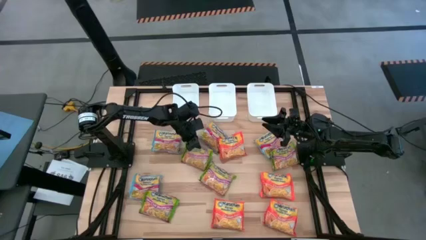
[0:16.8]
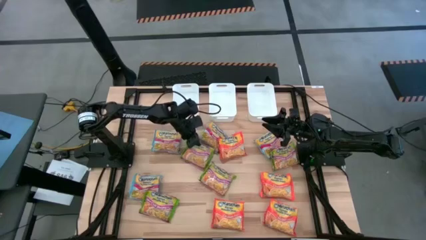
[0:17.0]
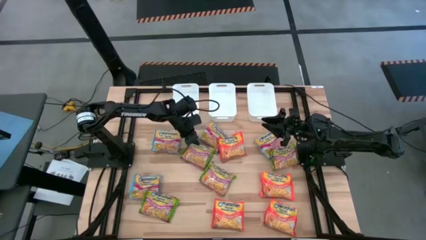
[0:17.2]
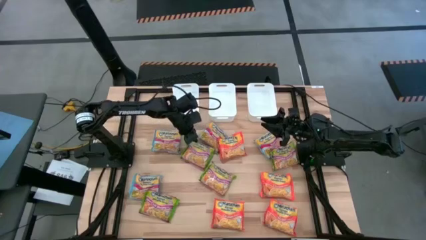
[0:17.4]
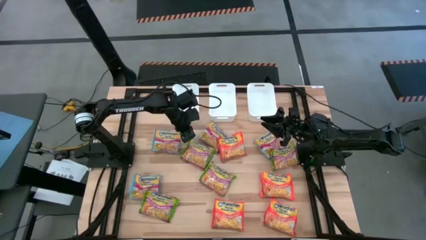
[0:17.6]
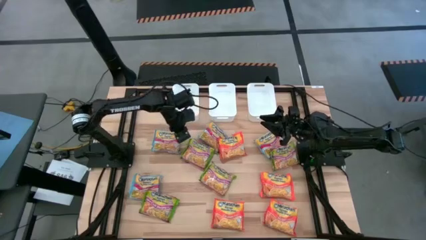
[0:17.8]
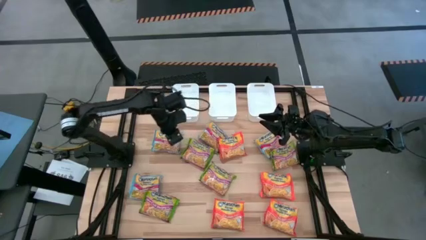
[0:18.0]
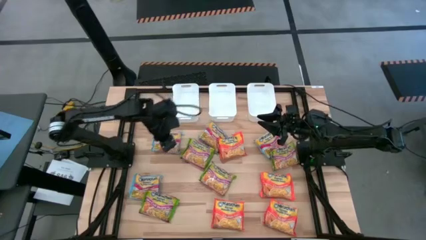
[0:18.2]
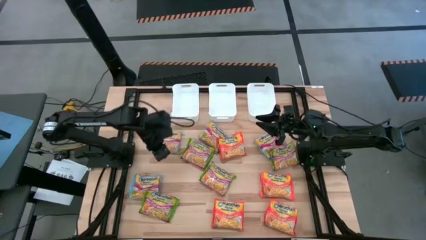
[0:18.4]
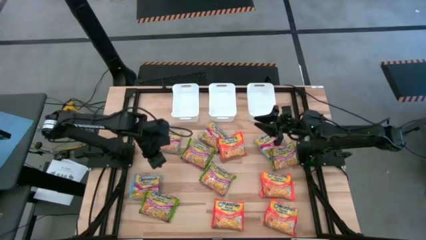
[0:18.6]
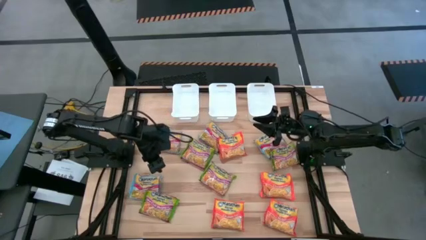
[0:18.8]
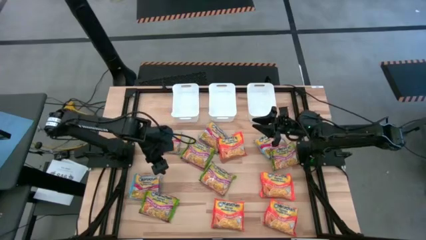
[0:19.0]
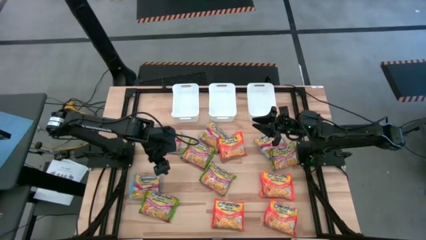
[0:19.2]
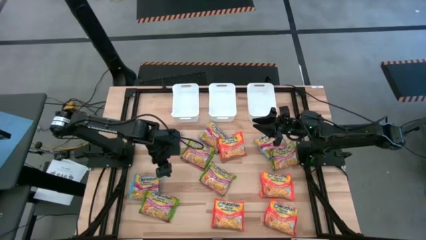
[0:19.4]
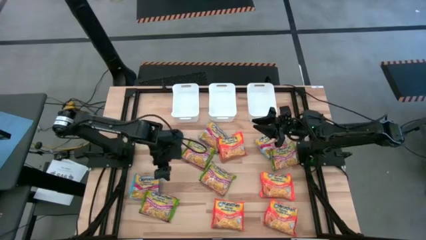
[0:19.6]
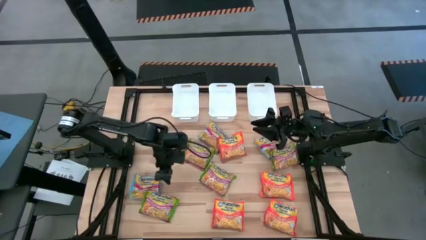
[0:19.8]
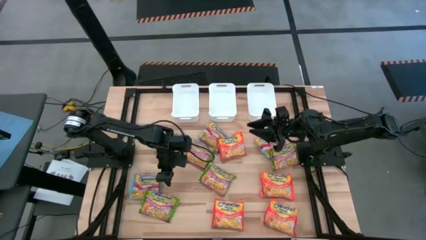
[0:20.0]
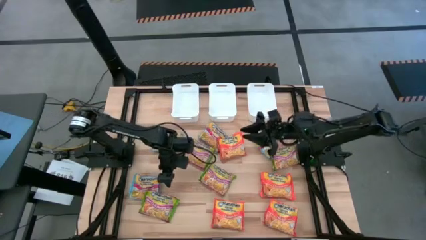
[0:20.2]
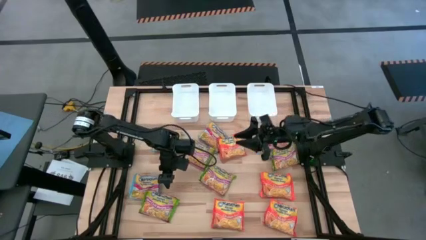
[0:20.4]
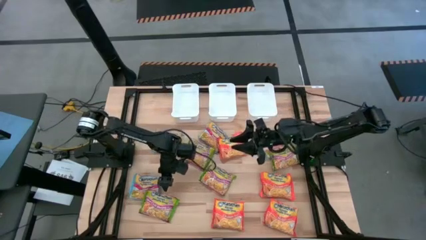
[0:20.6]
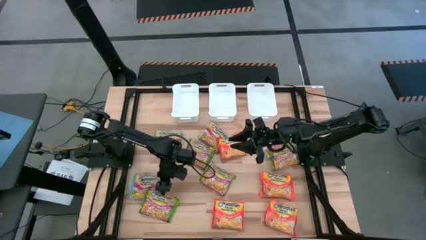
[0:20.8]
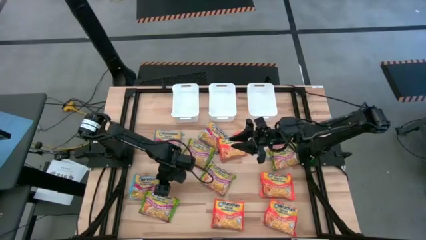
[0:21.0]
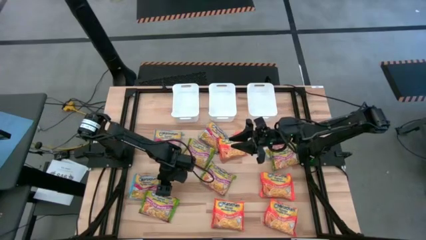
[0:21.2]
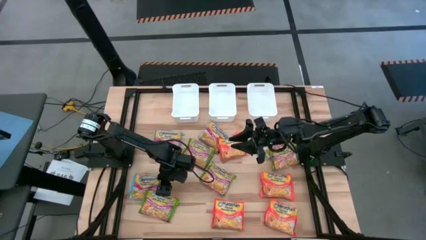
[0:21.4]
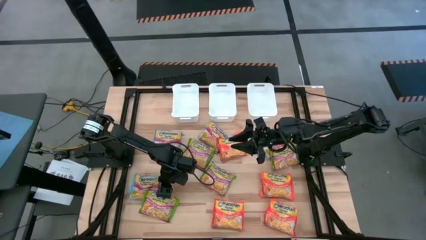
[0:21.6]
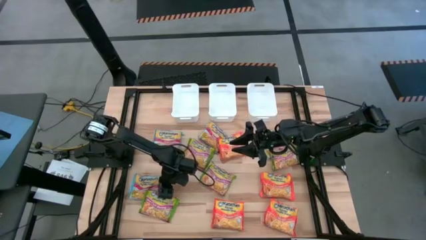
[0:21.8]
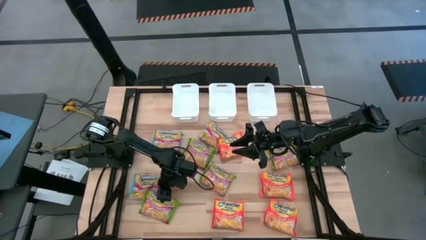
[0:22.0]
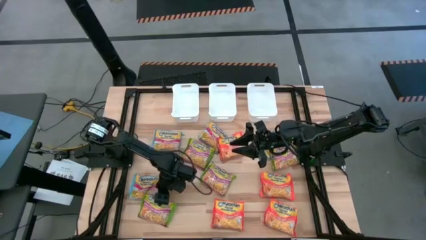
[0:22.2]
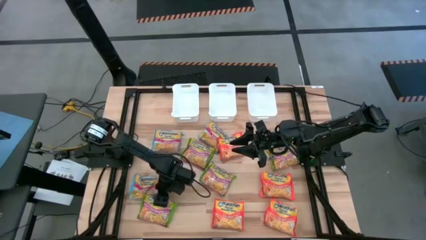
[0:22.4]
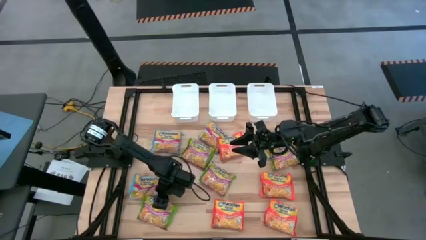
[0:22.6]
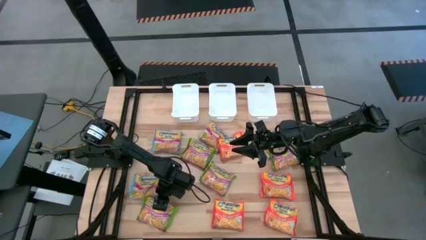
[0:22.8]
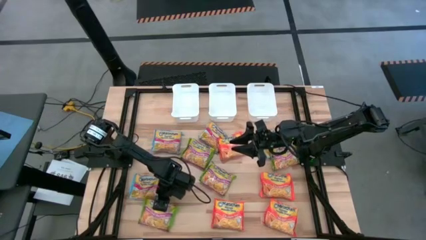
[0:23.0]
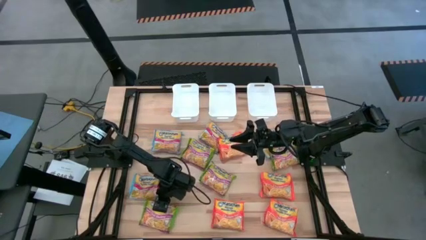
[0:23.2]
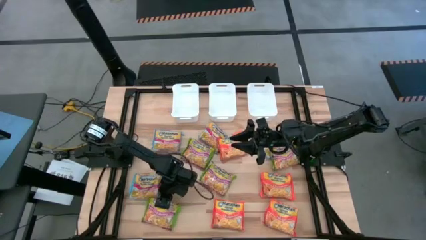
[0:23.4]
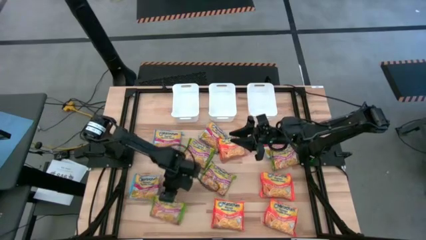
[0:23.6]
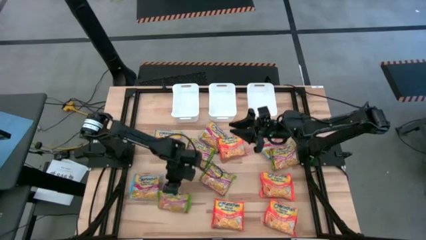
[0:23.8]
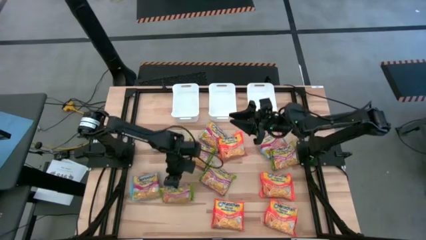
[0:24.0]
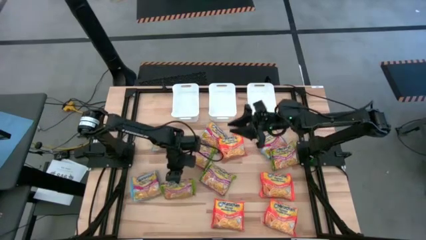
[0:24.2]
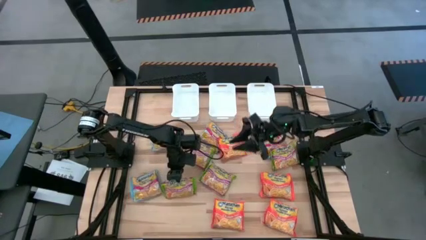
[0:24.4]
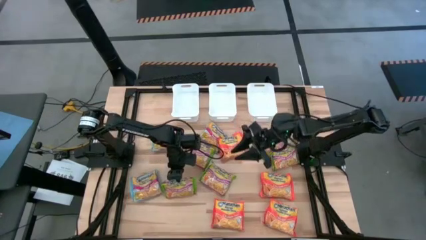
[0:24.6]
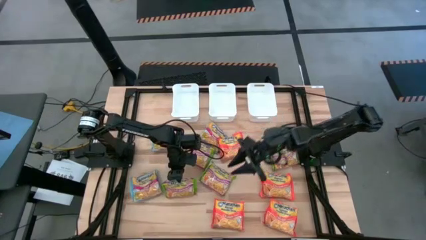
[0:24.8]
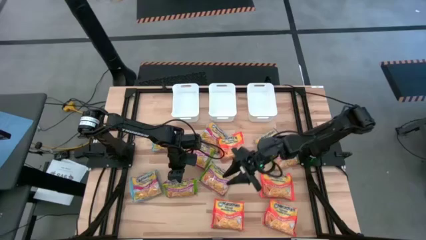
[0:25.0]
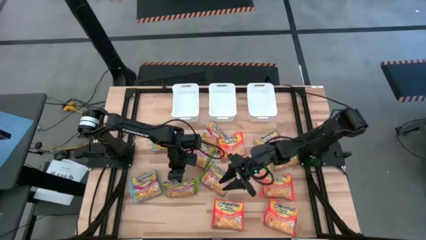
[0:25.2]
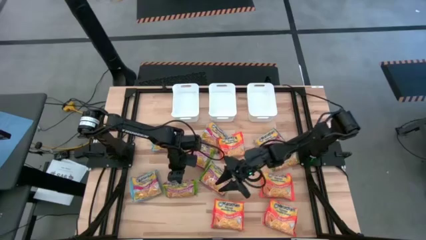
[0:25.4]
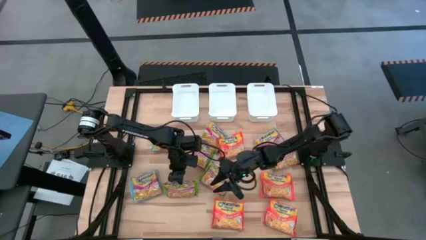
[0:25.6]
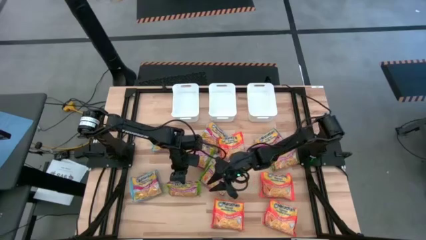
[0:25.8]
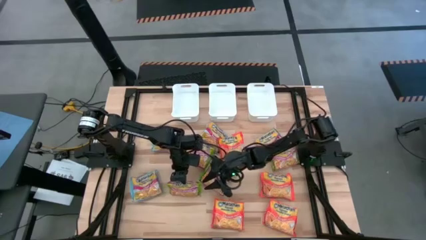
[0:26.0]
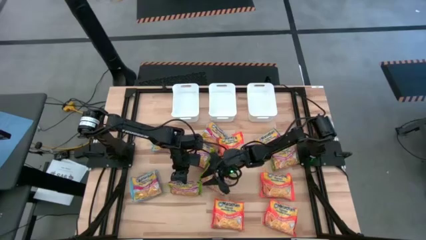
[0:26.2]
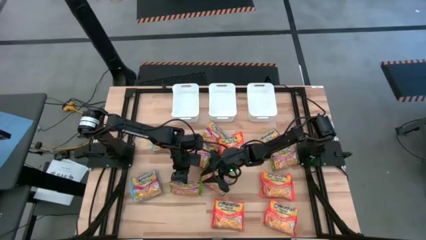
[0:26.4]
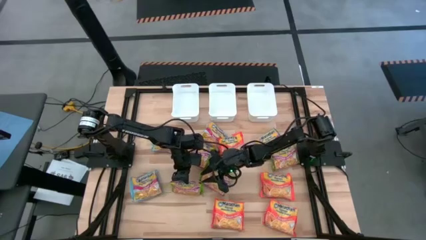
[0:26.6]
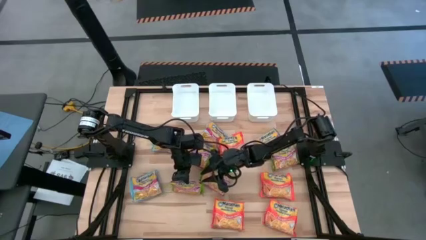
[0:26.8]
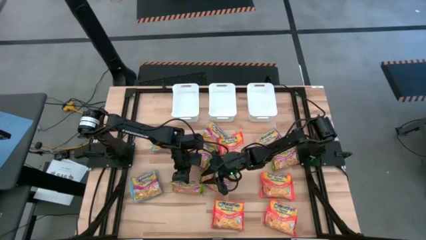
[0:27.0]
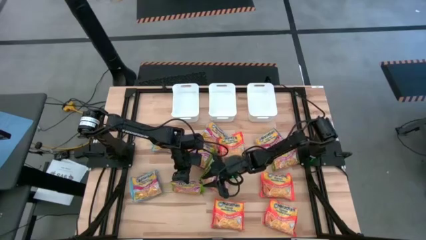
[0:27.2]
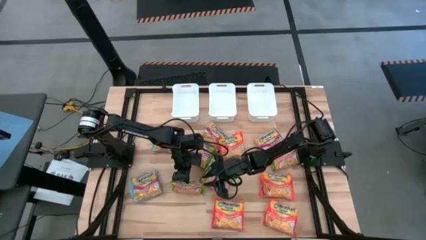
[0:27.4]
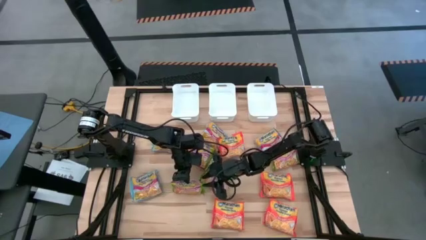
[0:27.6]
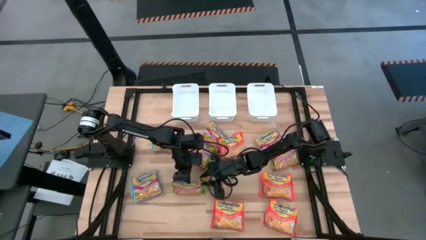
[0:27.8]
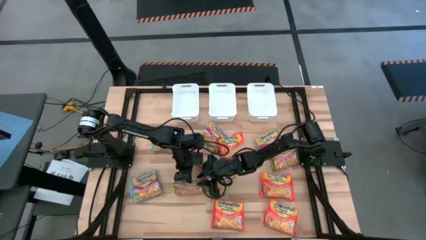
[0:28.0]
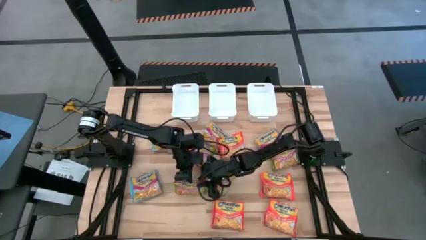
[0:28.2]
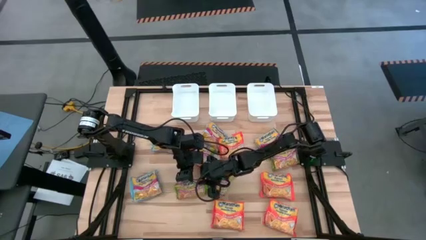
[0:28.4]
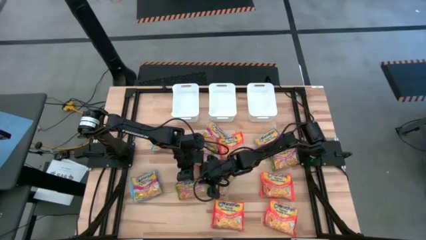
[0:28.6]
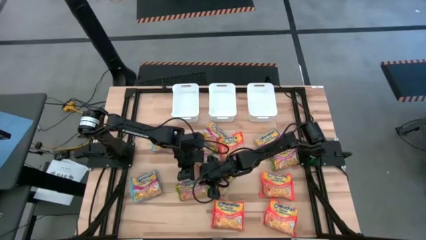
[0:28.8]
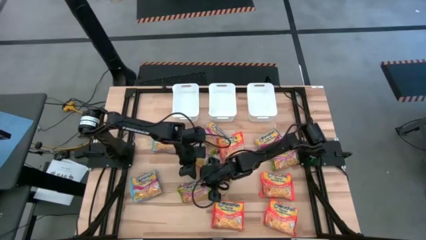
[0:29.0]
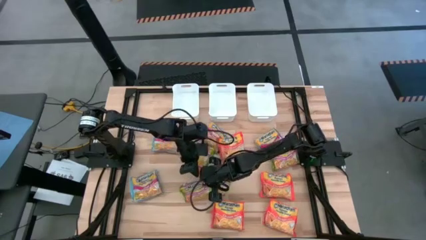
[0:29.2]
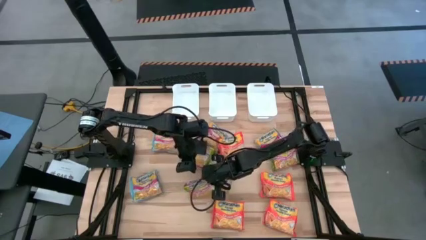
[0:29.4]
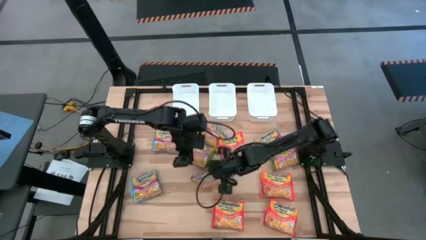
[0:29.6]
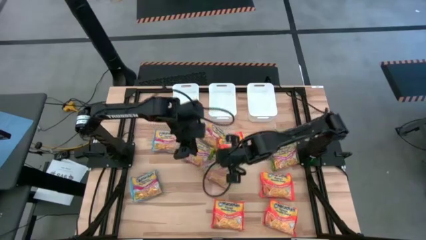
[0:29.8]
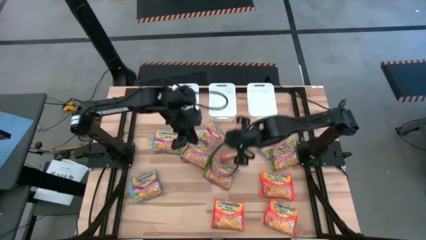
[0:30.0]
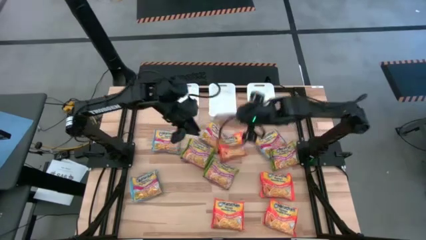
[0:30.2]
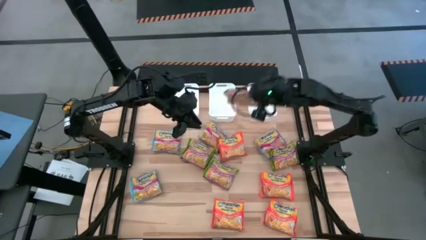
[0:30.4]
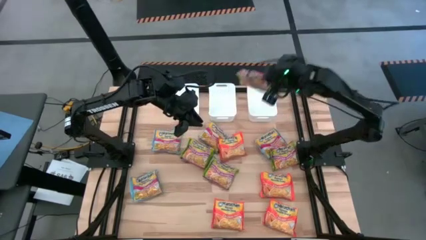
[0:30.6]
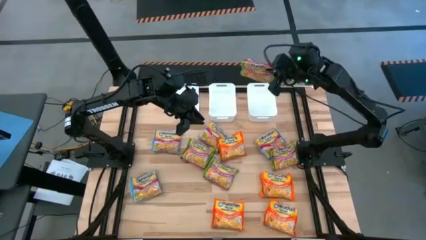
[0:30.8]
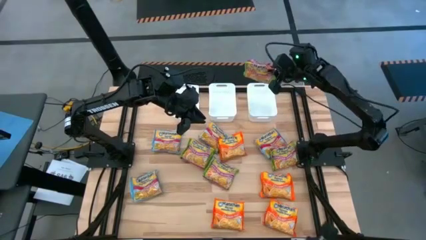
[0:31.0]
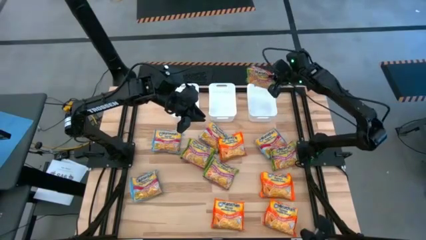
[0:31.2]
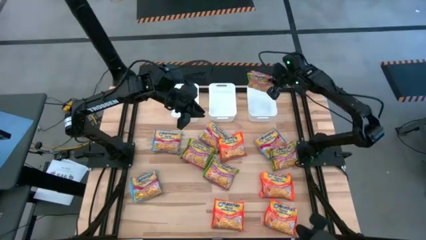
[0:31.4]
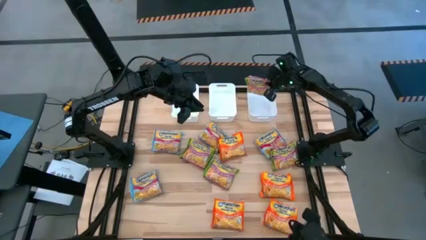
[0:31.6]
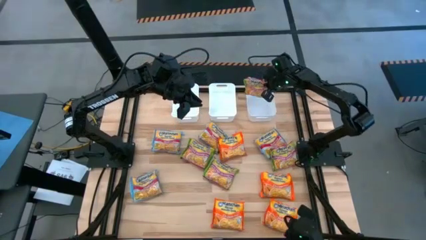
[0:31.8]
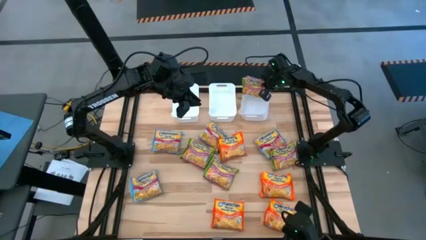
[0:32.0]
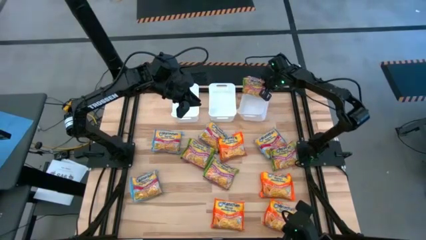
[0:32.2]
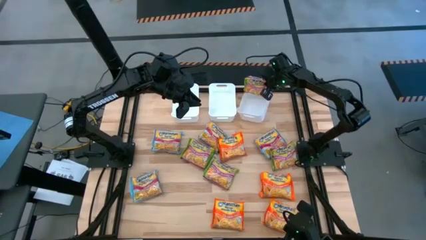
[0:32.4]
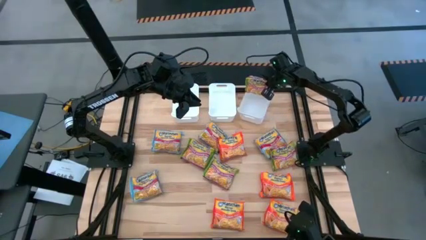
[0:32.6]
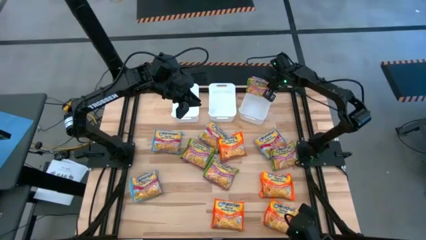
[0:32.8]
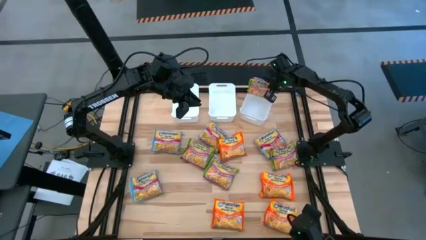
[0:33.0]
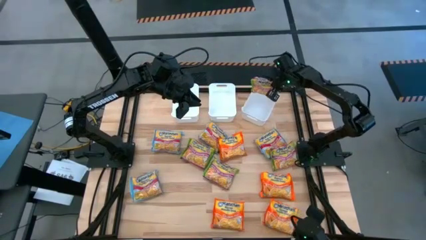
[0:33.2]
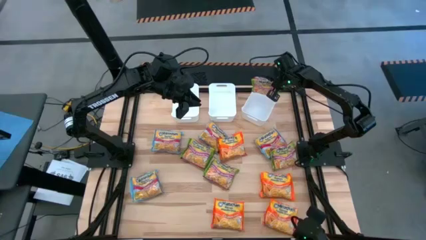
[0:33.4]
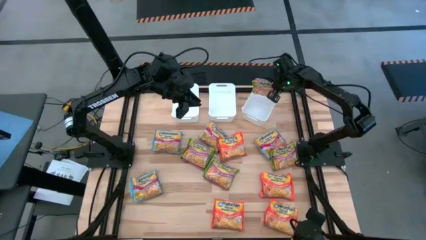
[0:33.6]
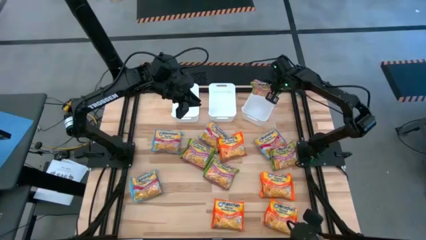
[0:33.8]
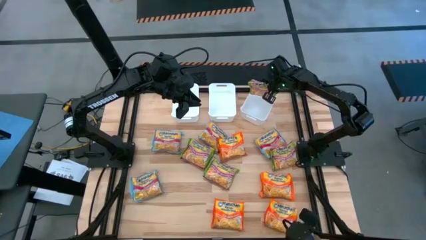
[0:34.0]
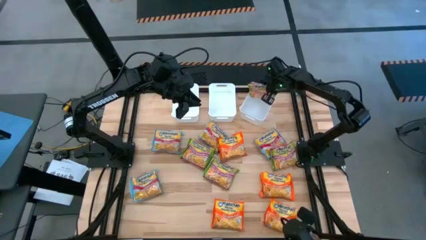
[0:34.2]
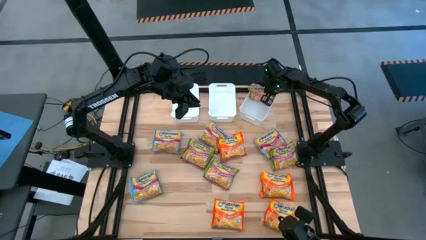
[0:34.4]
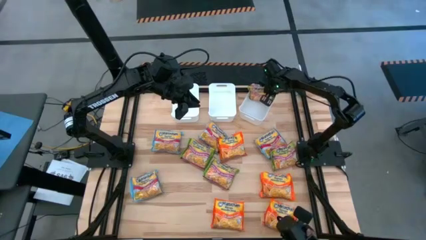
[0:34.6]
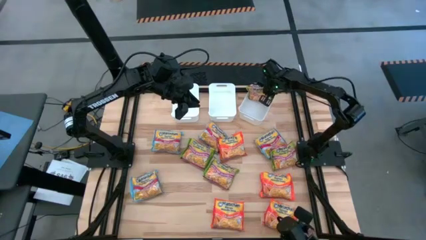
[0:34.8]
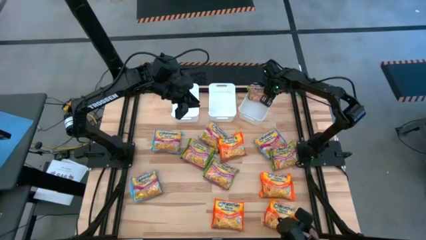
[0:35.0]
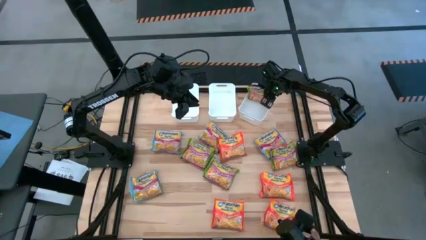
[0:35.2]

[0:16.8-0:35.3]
Task: Sort Maruchan noodles
Put the green noodle pack into the right white bin
